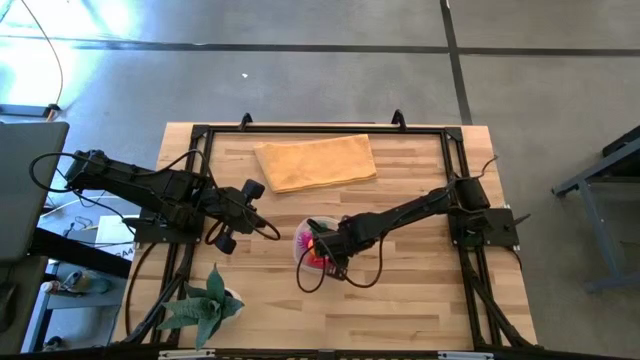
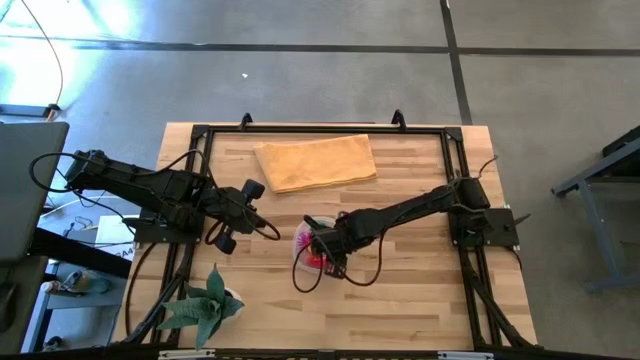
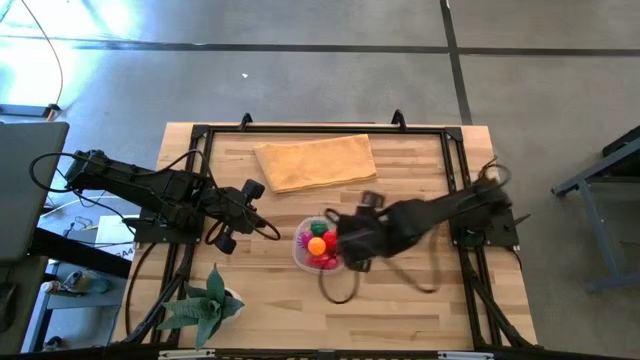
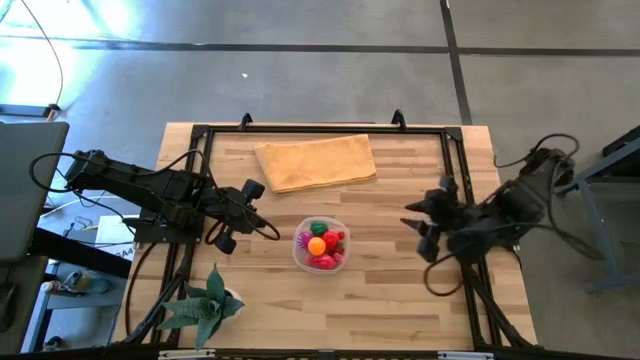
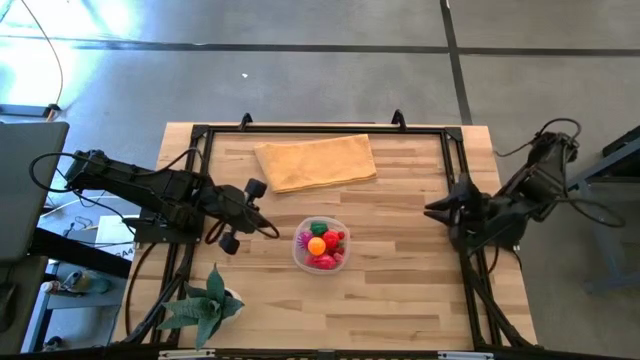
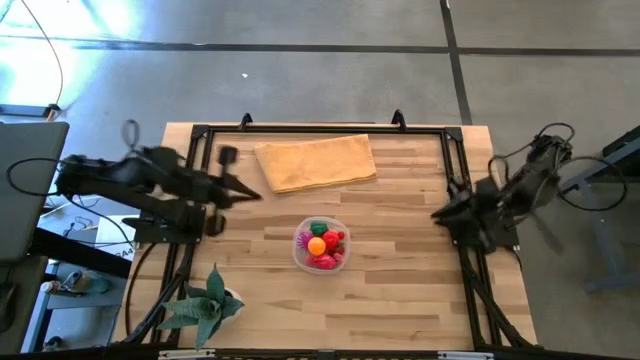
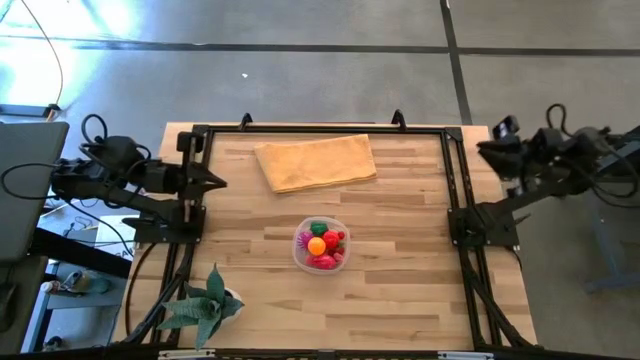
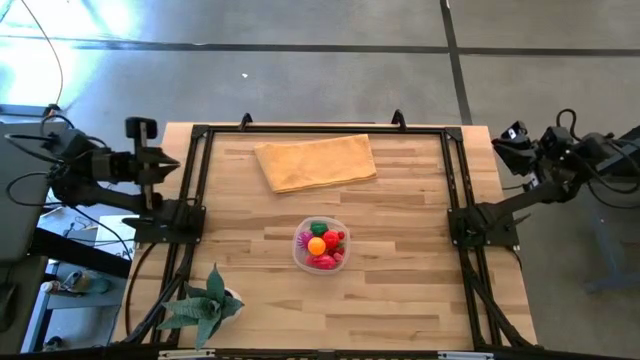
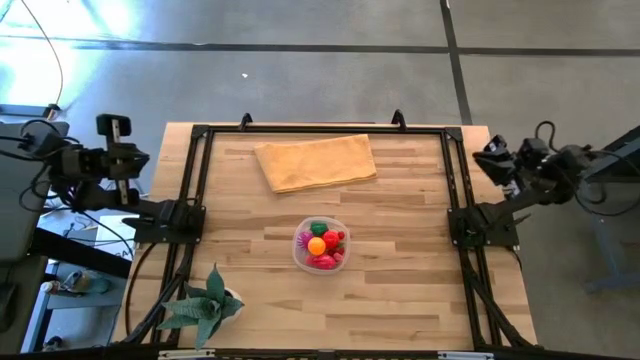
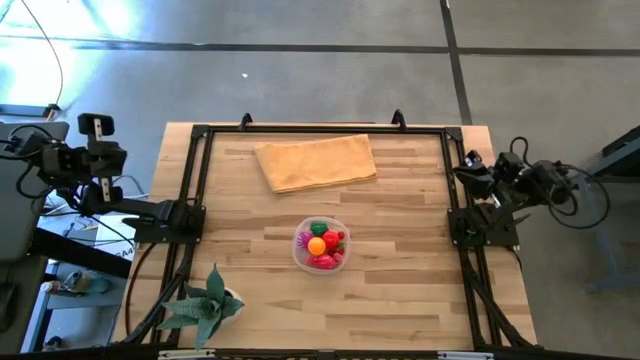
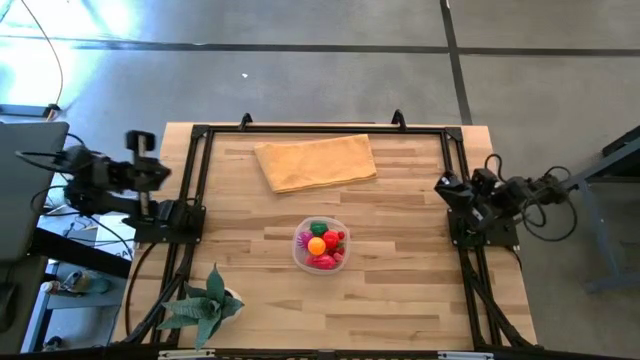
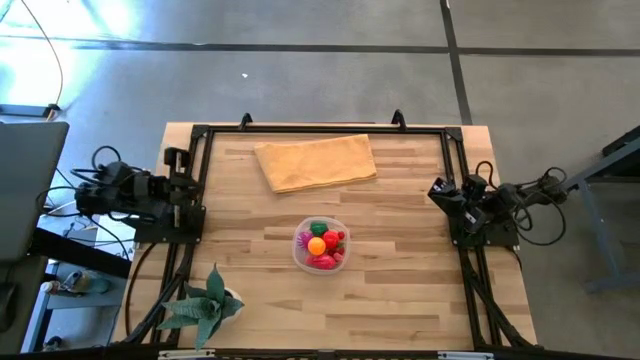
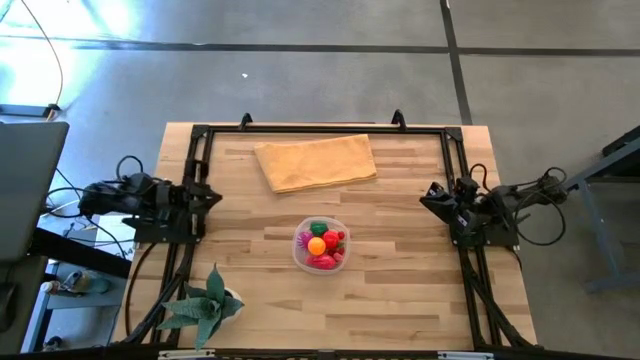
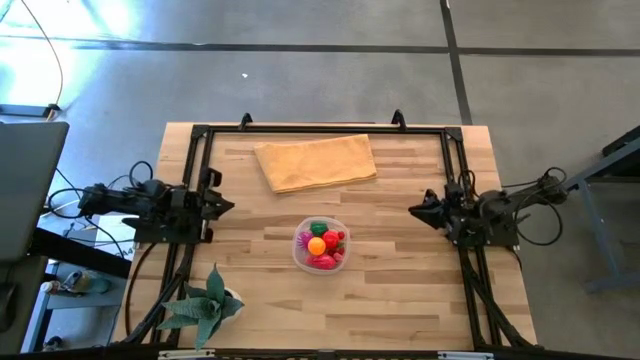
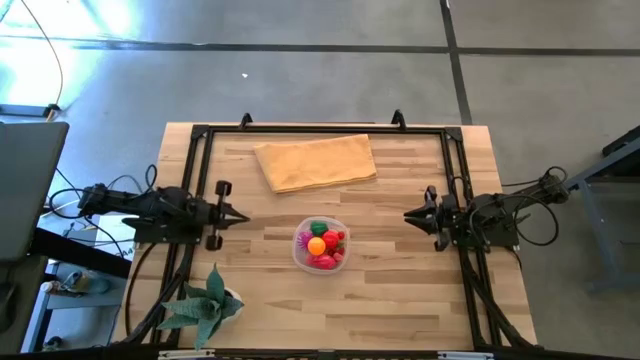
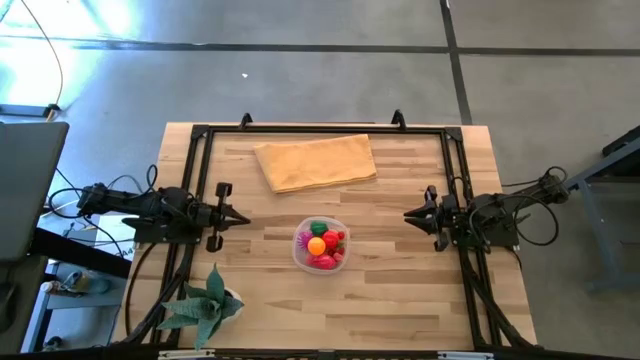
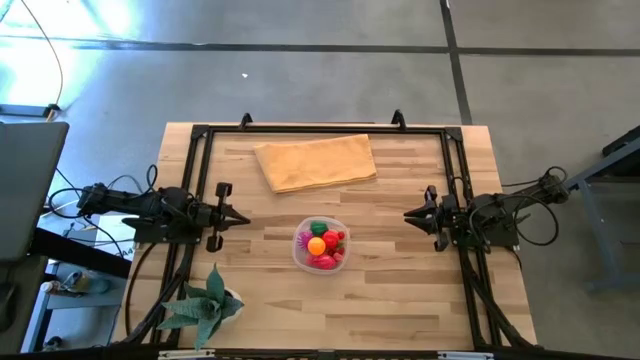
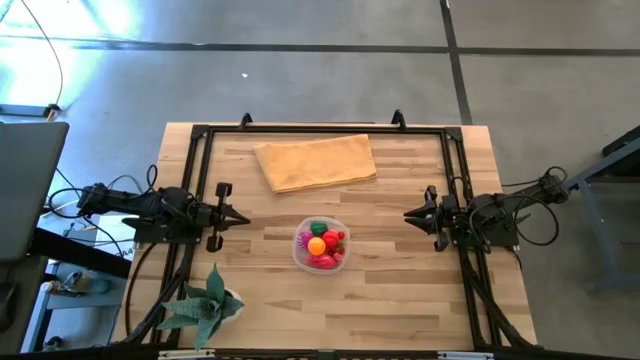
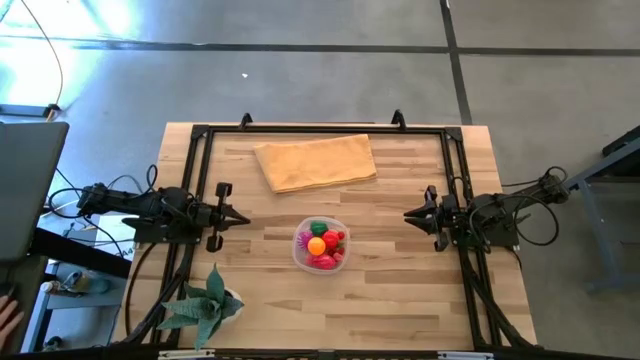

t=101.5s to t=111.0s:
Task: Pick and placing Produce into tupperware
Return to Home Position

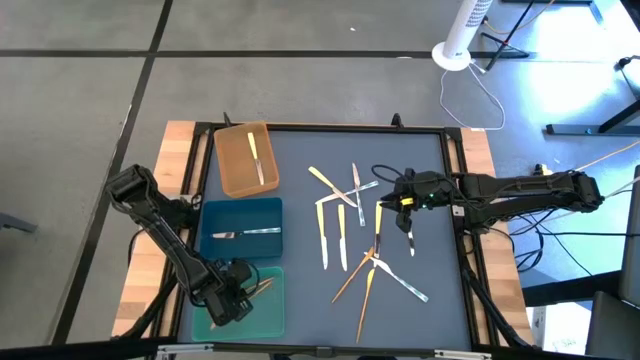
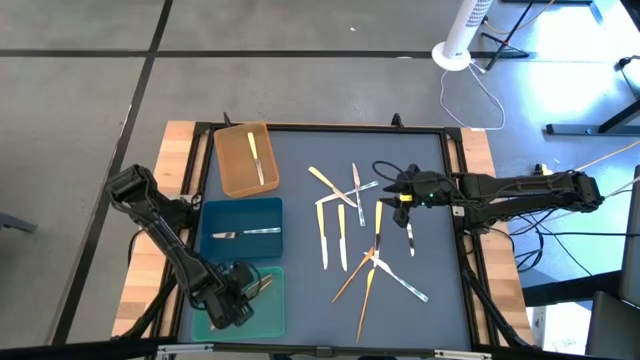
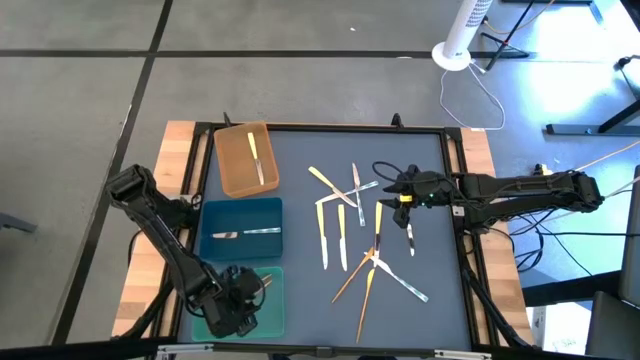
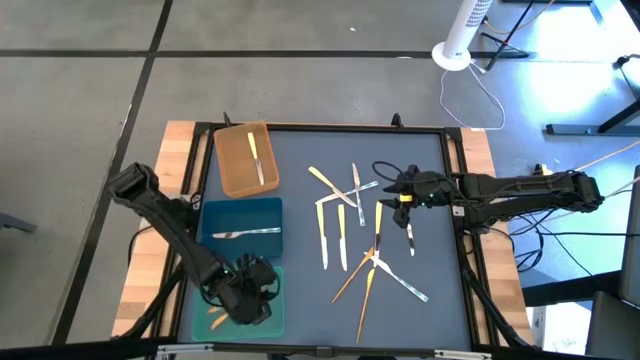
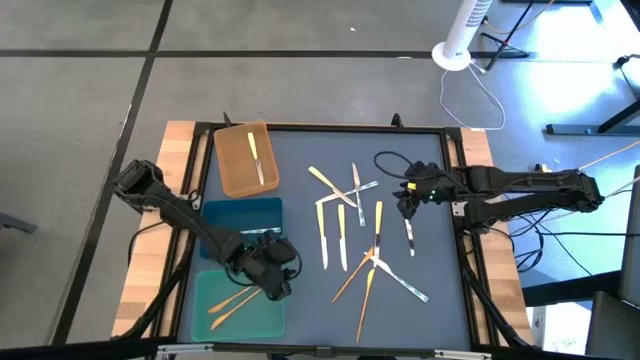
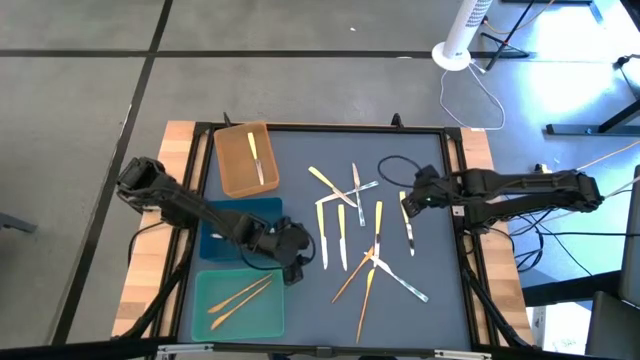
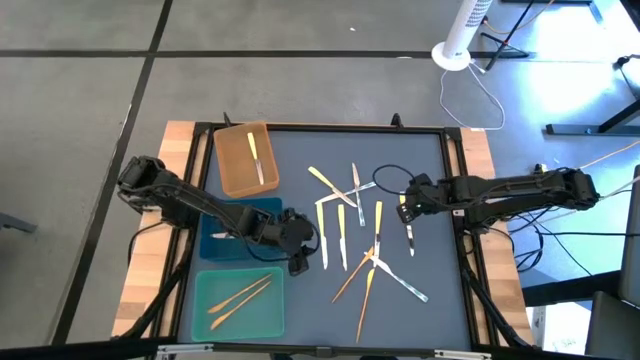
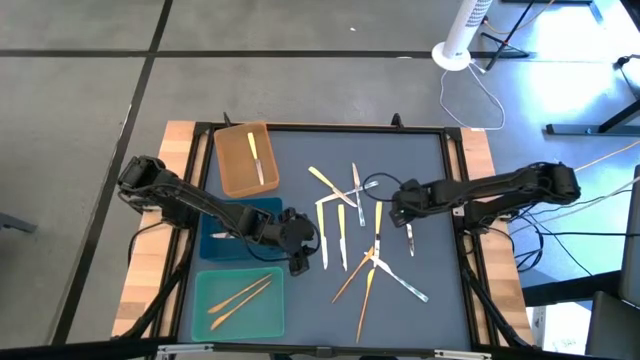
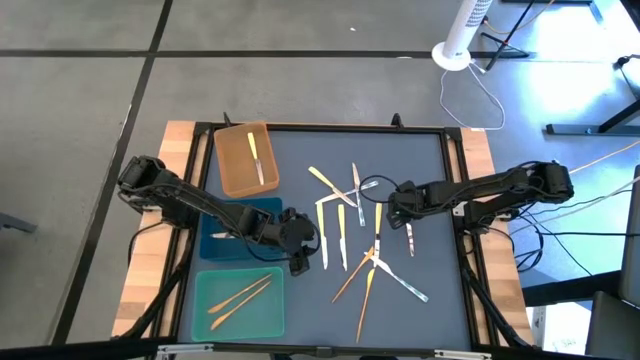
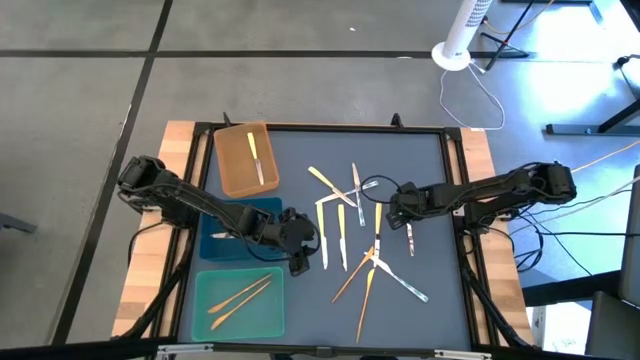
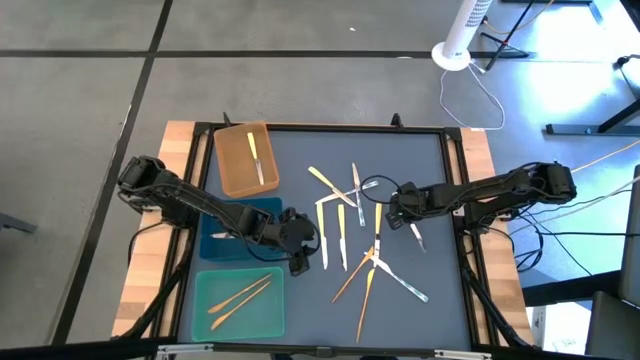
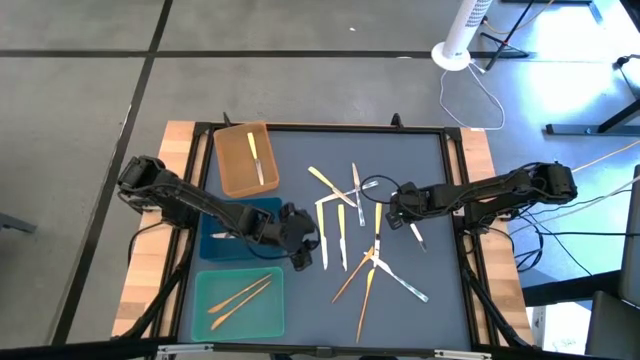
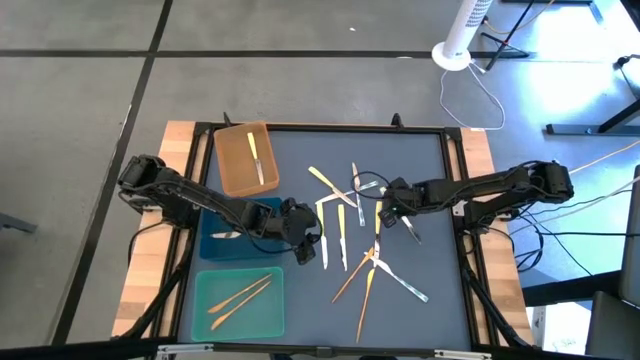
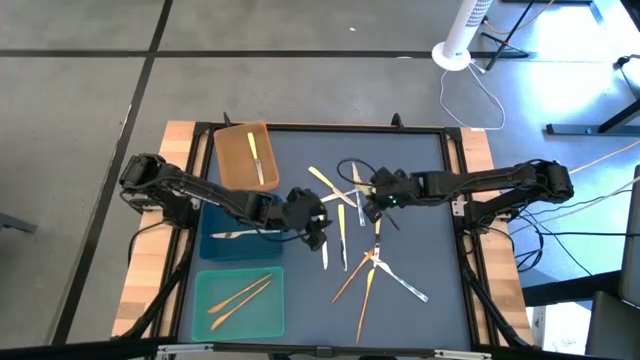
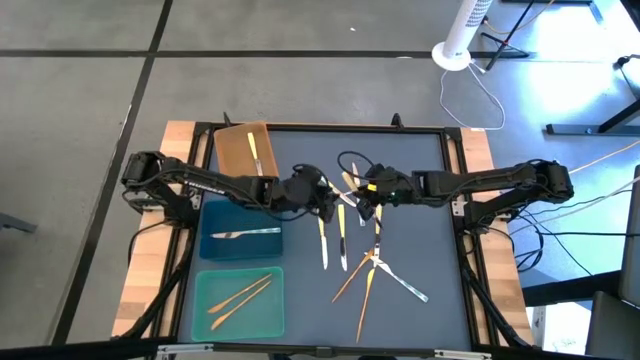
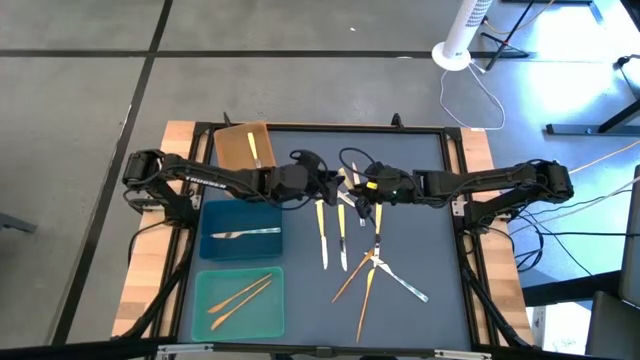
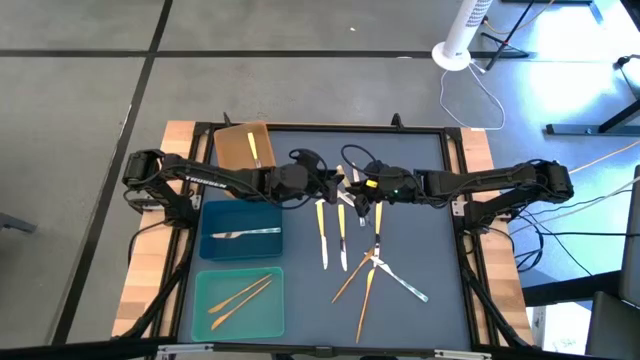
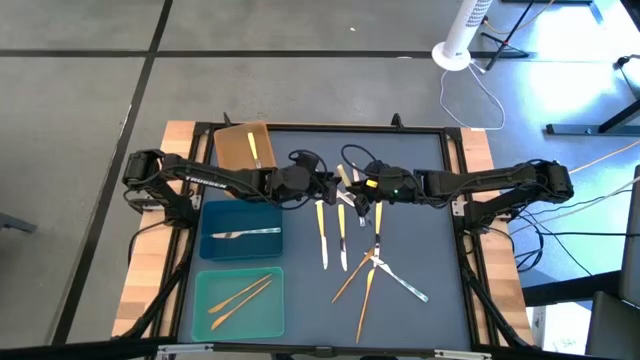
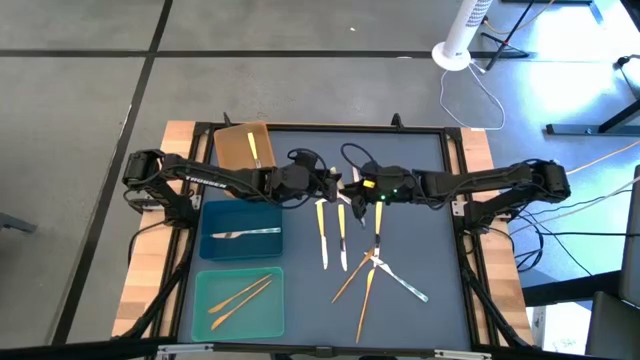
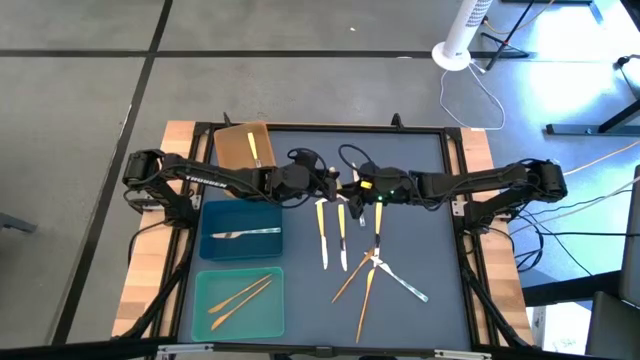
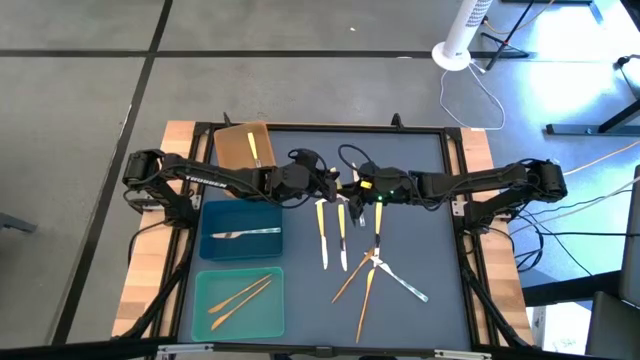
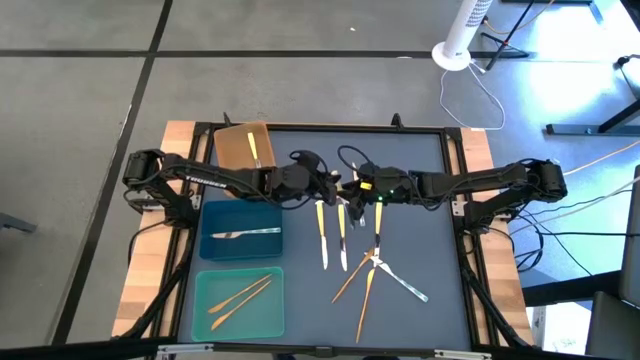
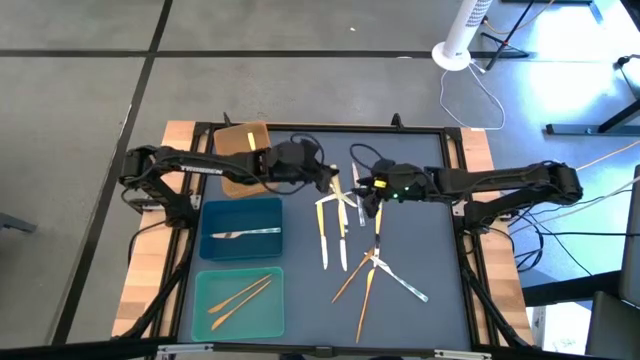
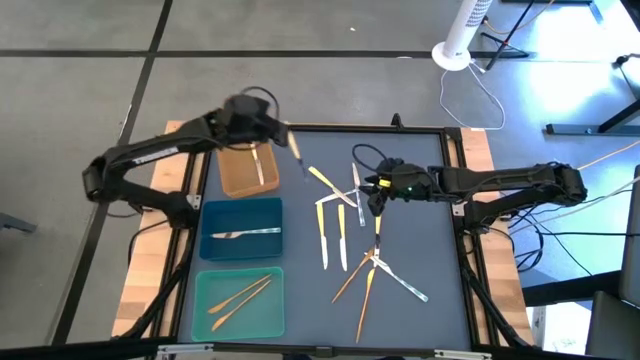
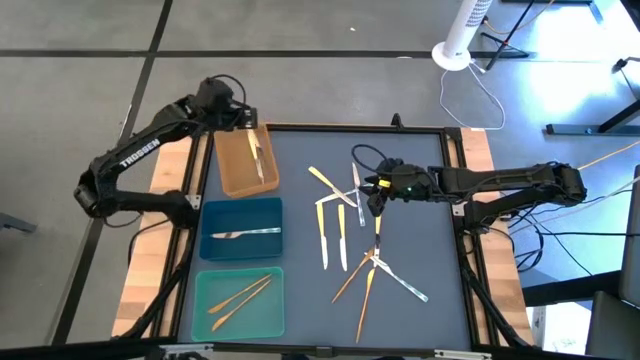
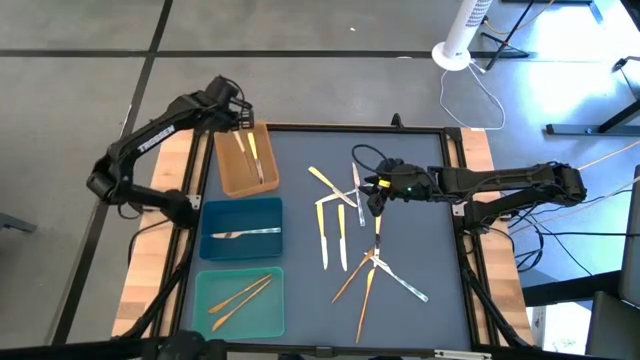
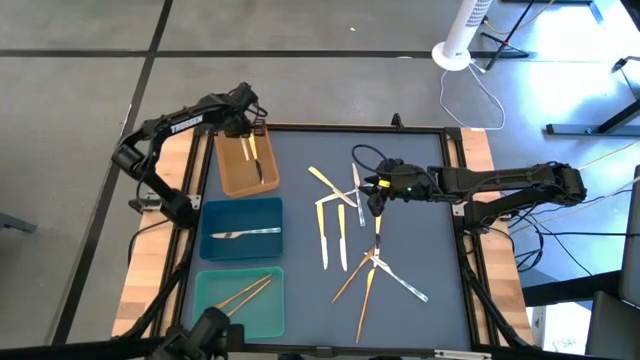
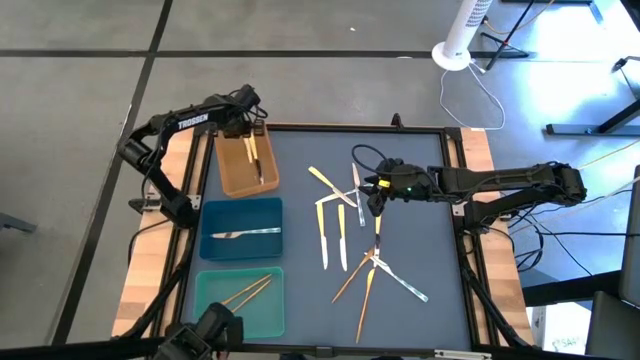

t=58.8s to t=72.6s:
Task: Sort silverware by color (type)
Put the yellow knife into the orange bin
